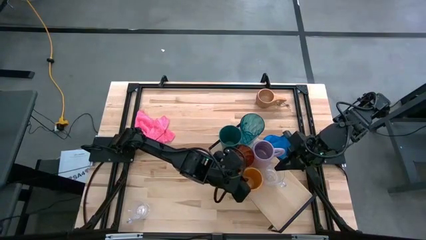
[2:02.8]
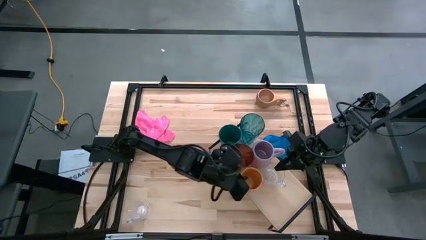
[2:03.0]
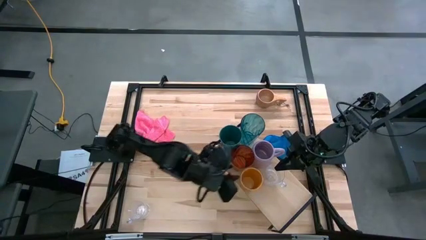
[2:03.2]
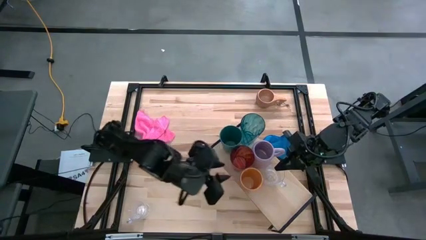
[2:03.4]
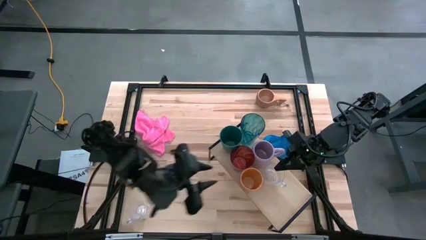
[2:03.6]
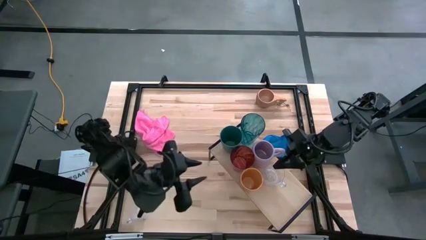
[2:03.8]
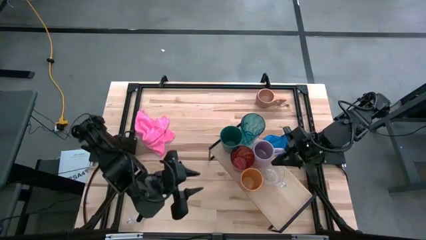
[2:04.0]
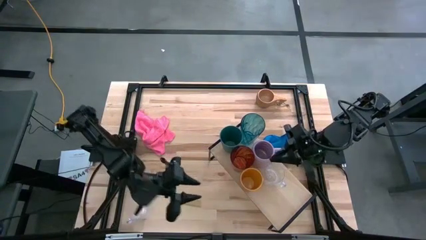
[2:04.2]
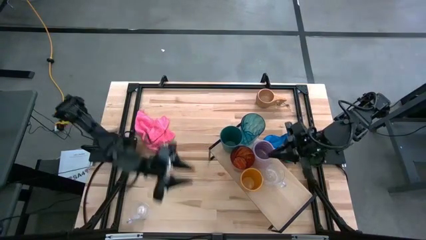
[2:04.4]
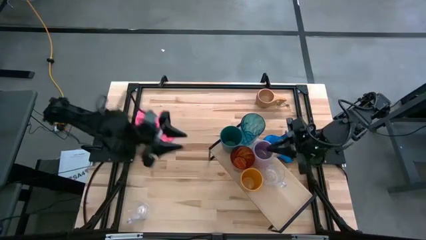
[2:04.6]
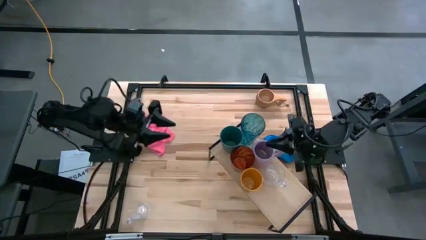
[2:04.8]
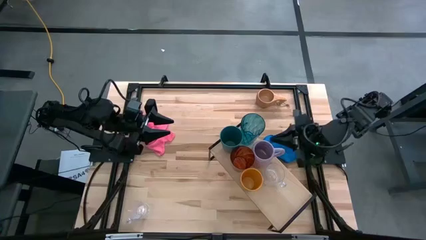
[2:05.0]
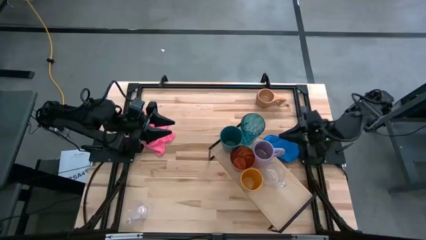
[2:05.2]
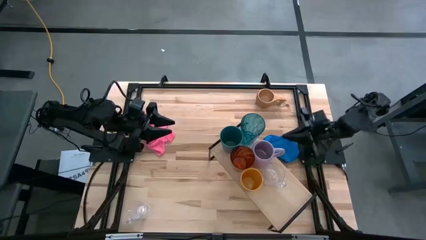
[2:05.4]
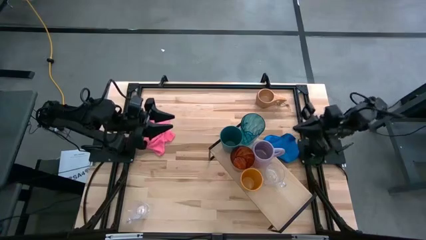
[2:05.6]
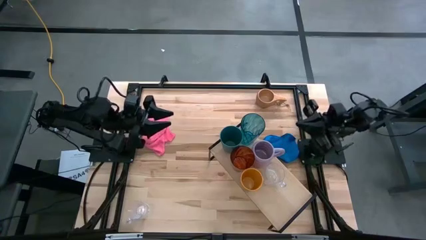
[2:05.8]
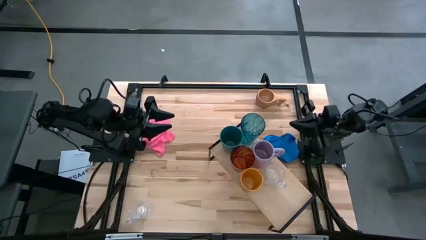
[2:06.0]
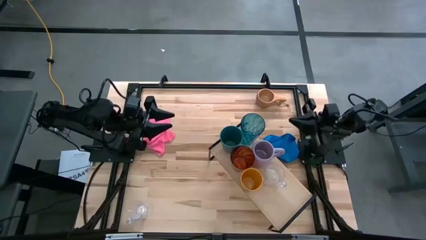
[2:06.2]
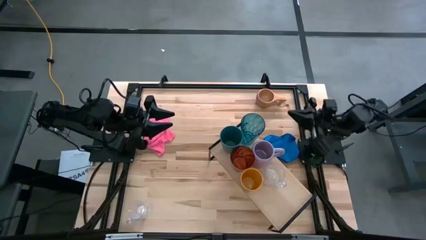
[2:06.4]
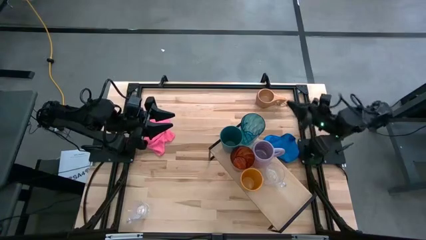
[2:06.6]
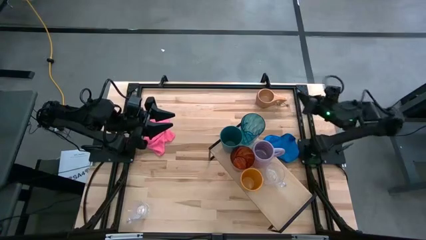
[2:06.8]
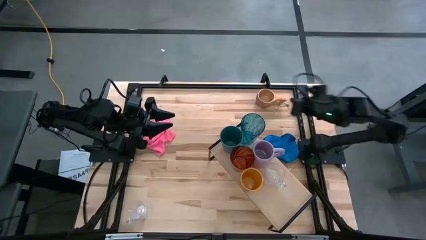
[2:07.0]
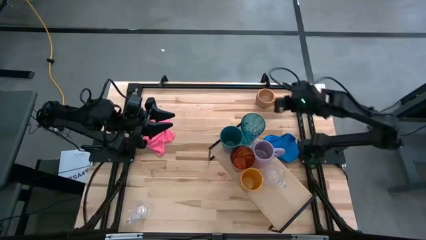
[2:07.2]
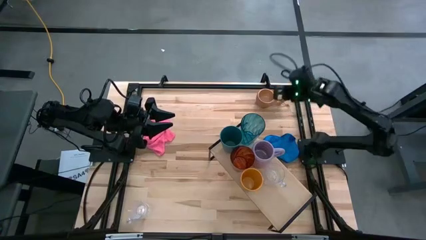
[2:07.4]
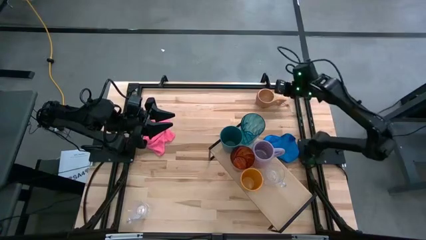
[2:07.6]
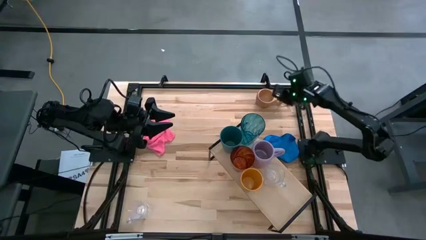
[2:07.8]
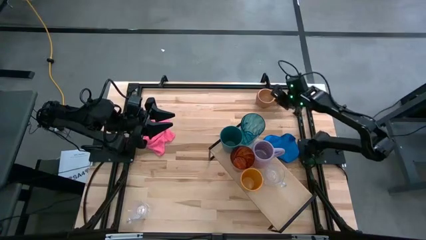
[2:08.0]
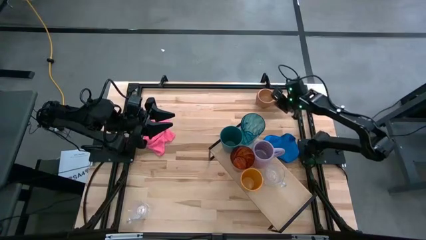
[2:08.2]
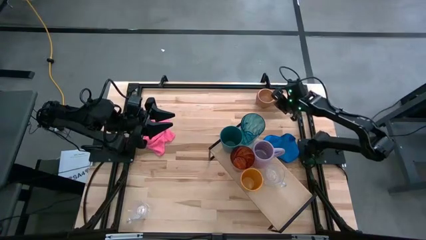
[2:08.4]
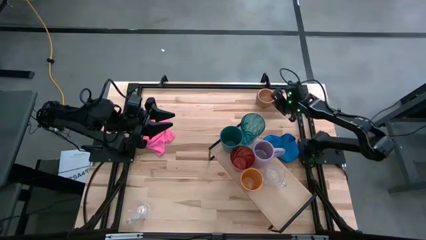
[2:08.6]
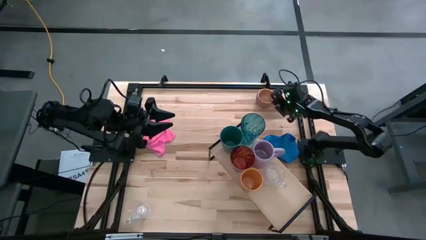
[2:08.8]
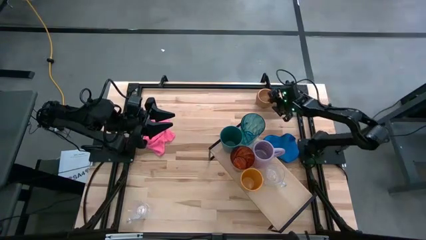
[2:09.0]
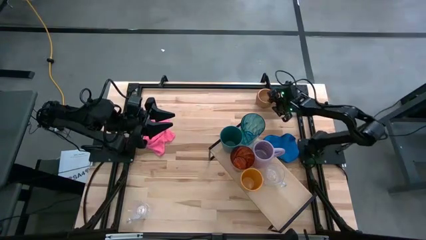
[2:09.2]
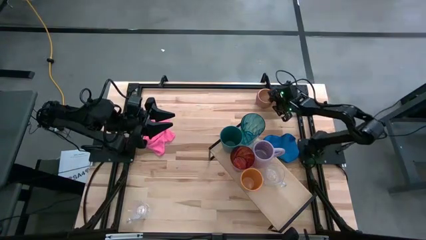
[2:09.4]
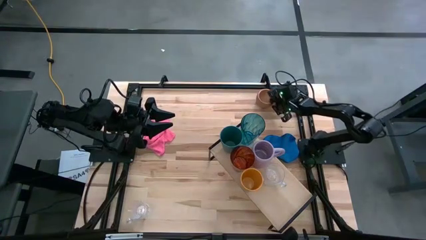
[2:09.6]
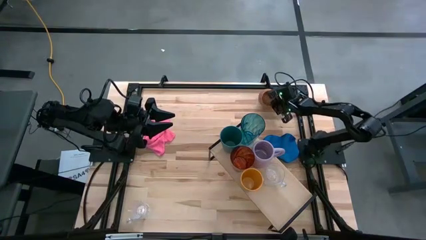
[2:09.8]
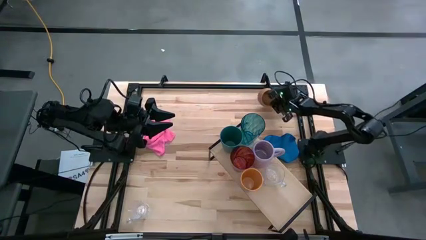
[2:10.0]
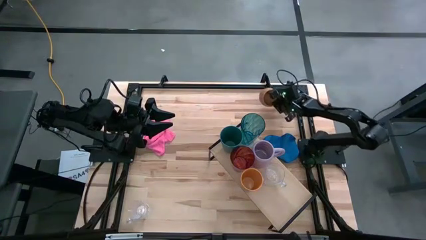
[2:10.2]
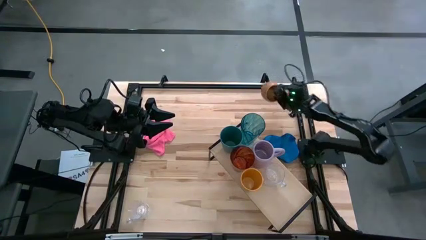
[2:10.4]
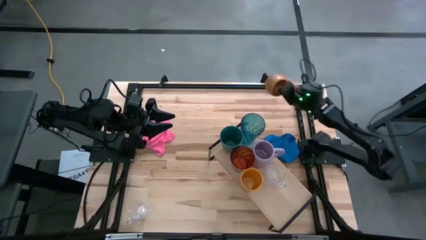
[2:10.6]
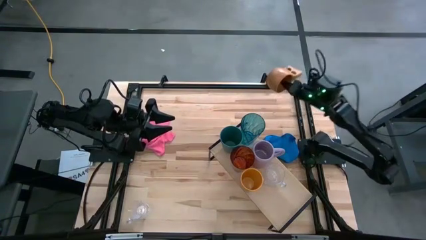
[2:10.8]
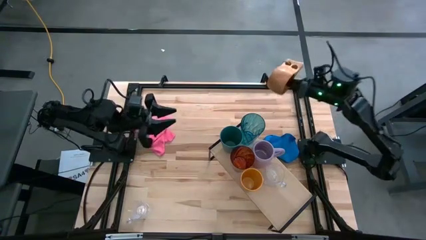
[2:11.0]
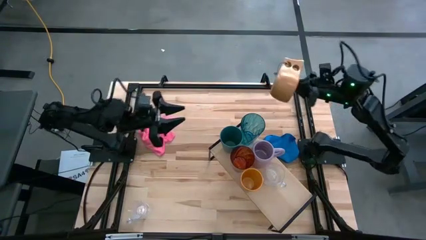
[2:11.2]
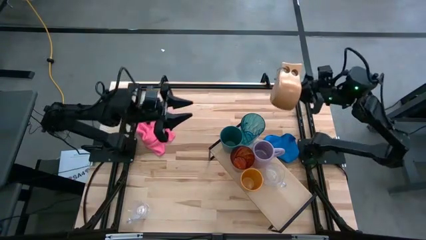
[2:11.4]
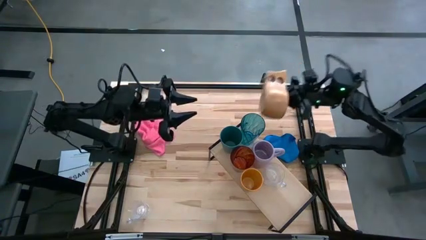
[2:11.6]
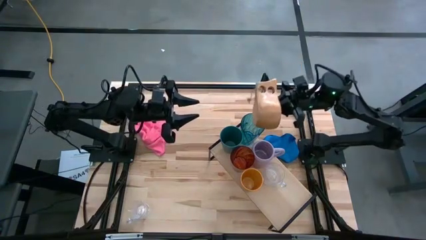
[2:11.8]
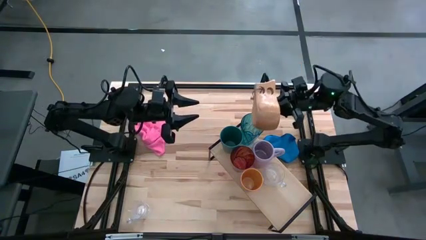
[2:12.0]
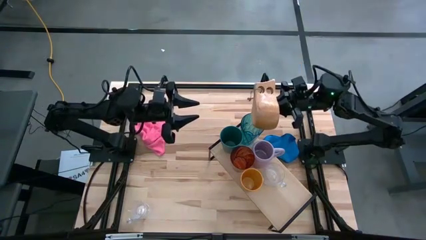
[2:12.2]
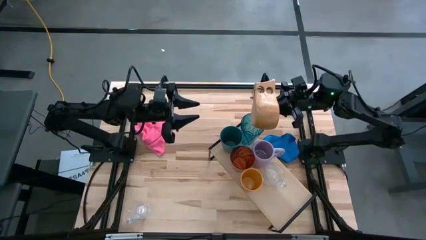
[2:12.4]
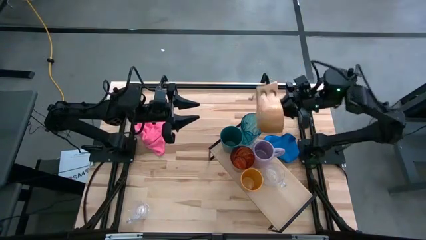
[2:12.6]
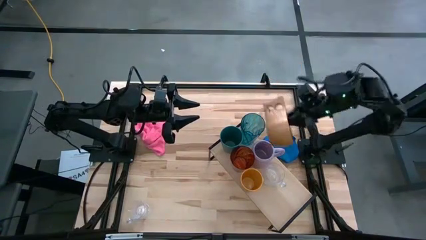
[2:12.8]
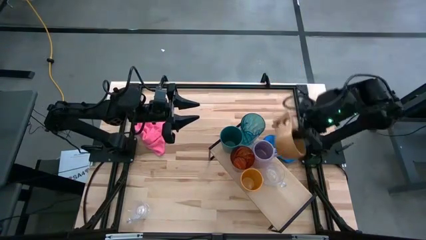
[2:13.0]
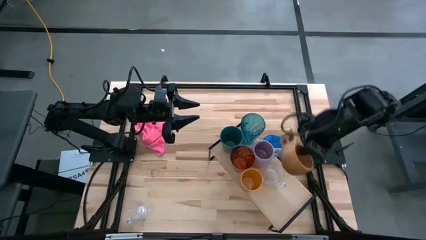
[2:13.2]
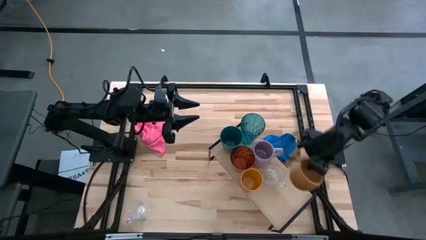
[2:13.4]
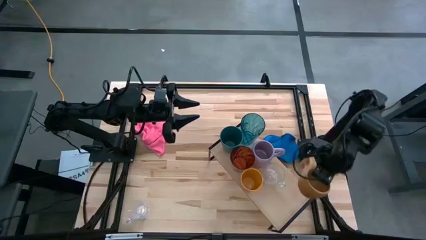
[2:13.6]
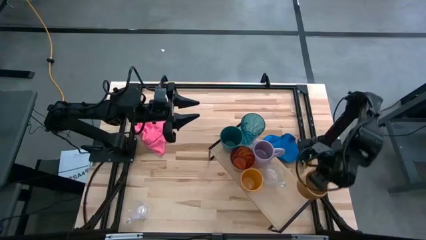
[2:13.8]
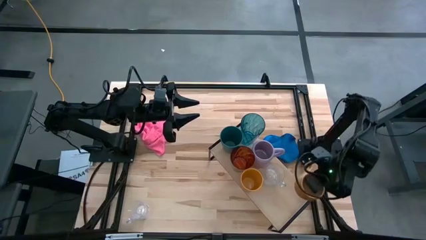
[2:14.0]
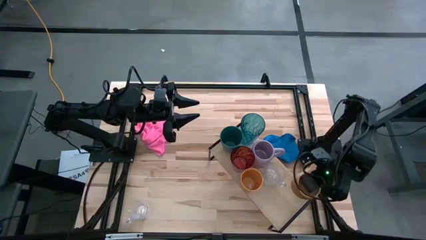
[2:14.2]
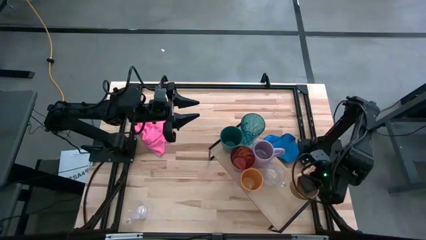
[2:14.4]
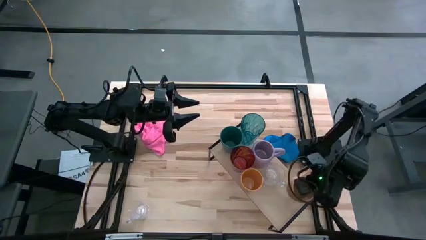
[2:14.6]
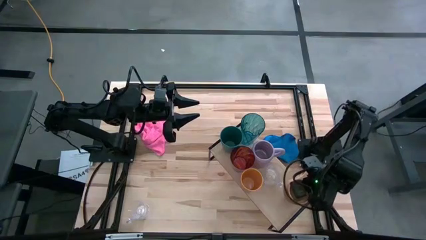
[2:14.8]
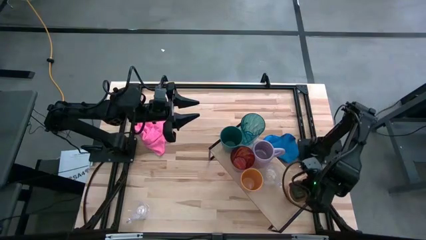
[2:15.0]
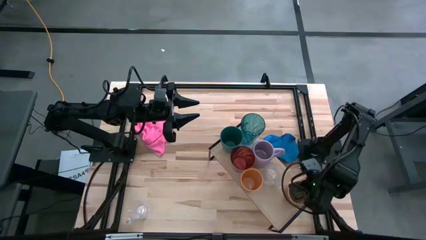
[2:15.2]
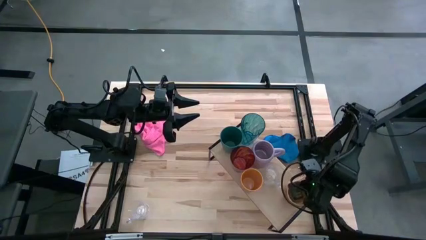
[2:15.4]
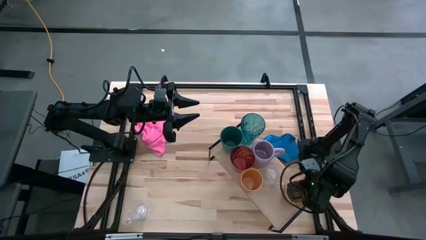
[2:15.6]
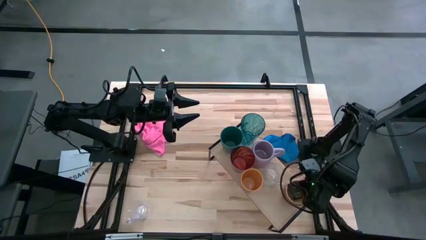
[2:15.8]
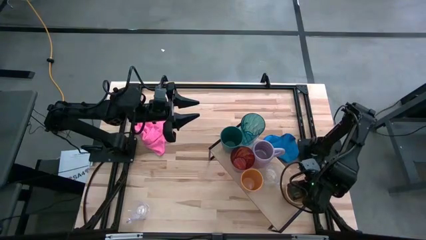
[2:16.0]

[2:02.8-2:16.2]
Task: Stack small to large cups/mugs on shelf
Put the brown mug on the shelf
